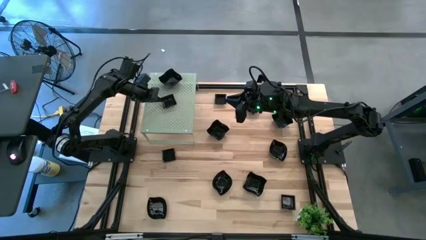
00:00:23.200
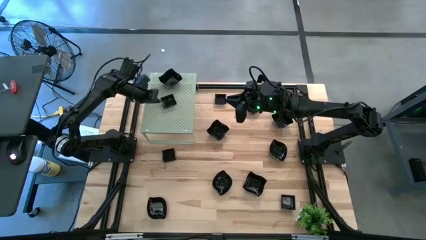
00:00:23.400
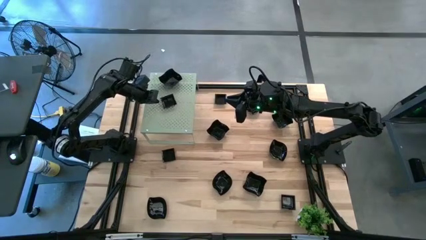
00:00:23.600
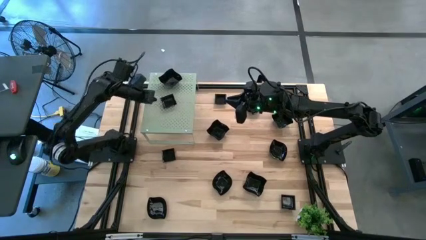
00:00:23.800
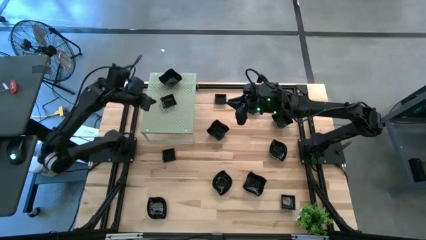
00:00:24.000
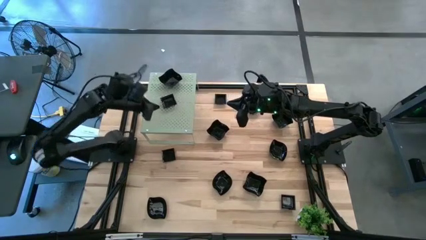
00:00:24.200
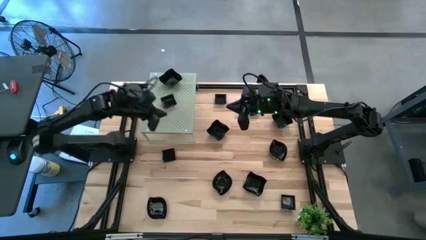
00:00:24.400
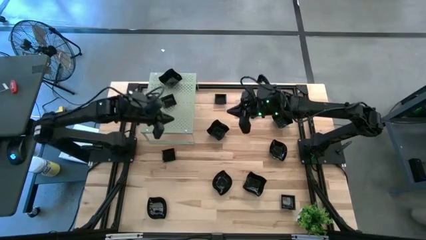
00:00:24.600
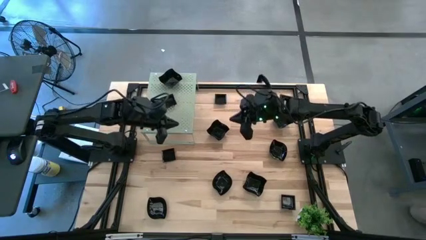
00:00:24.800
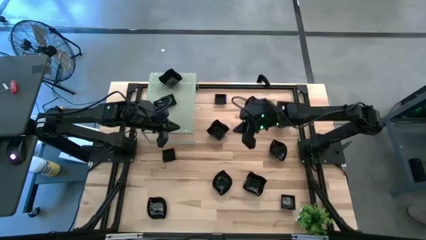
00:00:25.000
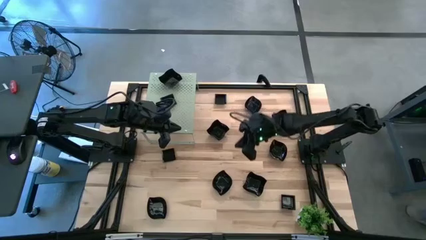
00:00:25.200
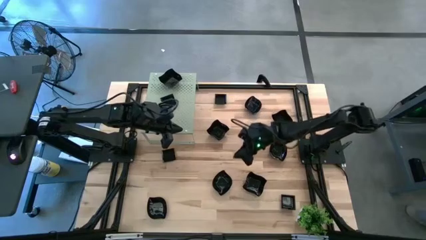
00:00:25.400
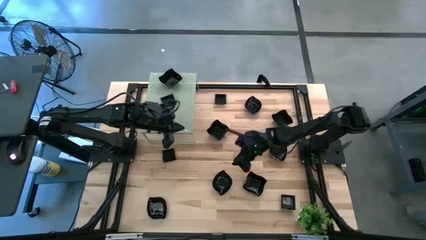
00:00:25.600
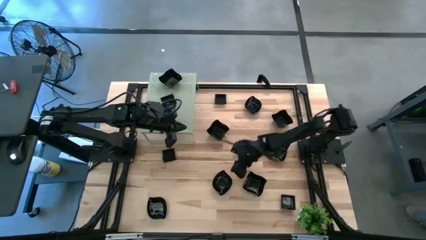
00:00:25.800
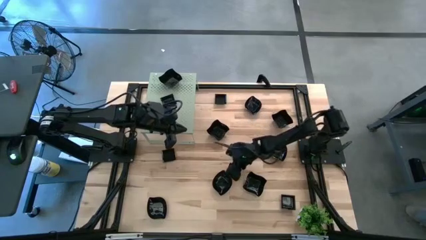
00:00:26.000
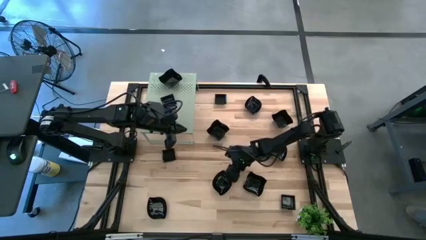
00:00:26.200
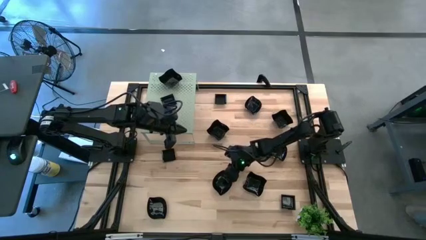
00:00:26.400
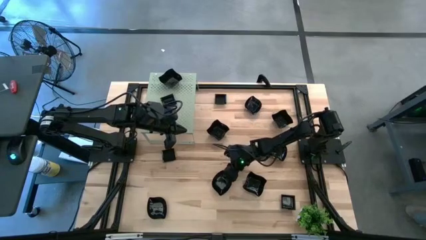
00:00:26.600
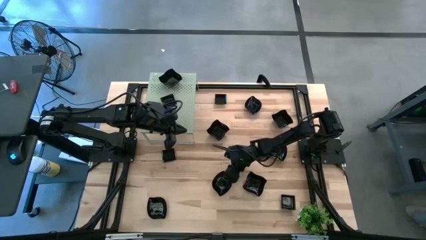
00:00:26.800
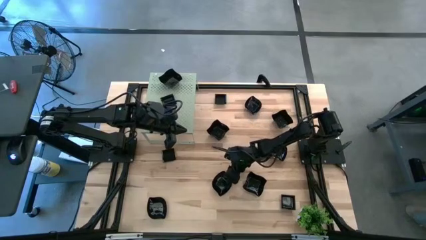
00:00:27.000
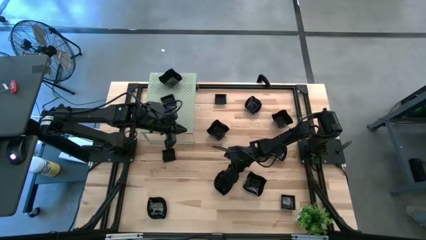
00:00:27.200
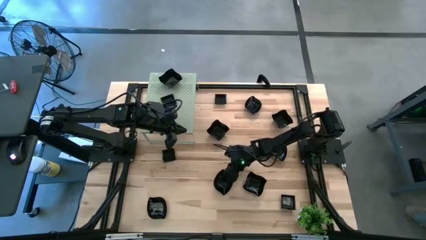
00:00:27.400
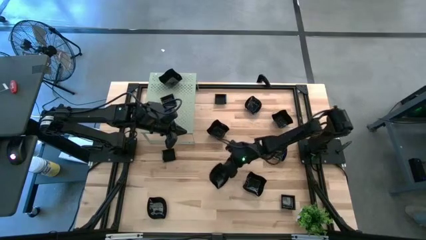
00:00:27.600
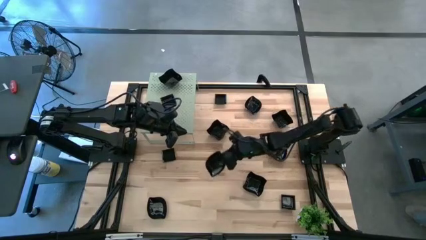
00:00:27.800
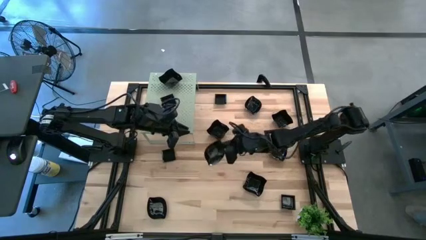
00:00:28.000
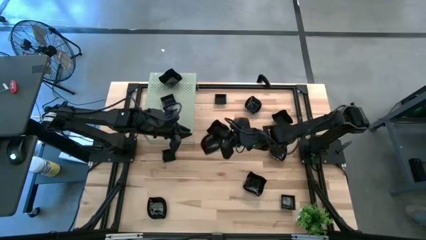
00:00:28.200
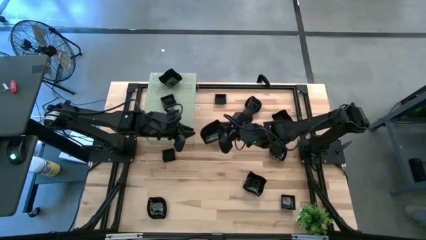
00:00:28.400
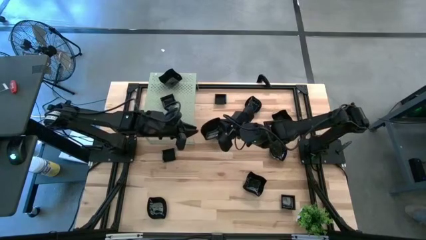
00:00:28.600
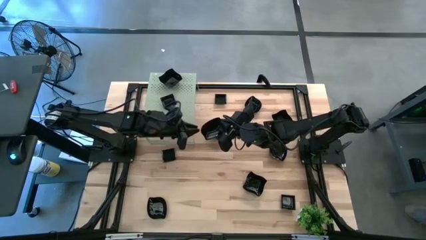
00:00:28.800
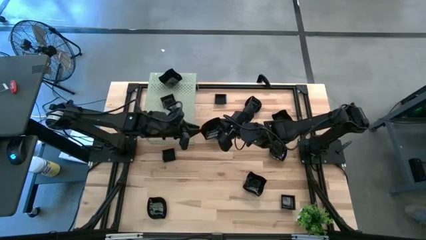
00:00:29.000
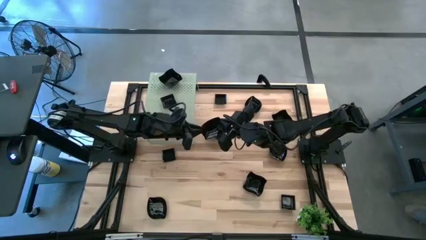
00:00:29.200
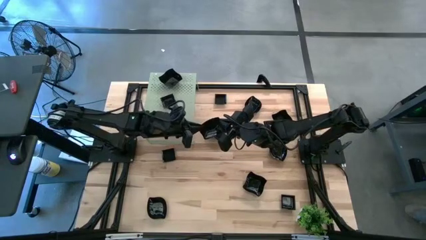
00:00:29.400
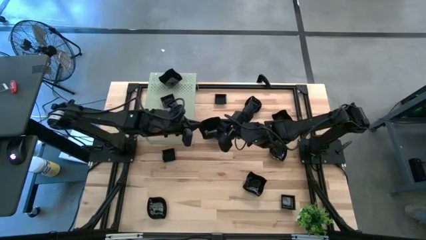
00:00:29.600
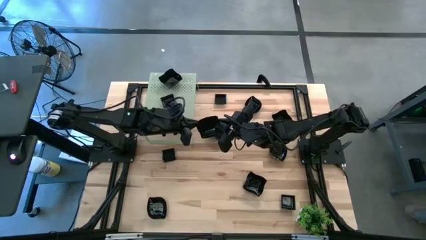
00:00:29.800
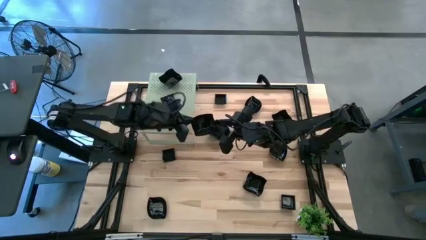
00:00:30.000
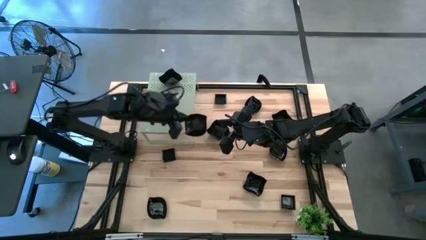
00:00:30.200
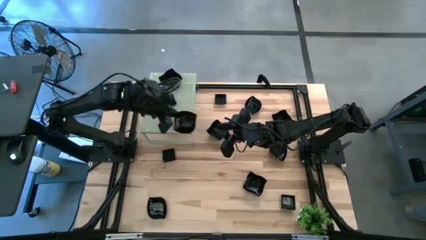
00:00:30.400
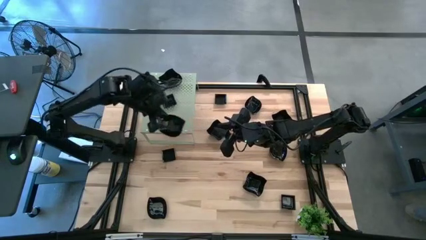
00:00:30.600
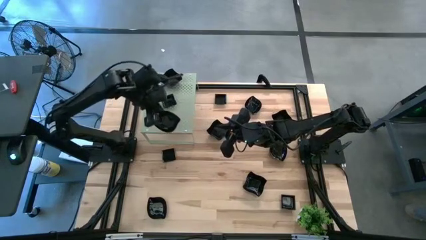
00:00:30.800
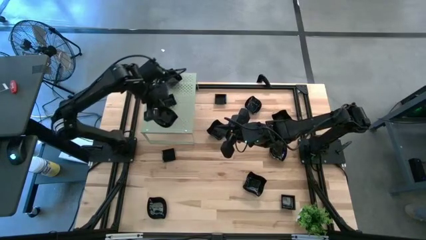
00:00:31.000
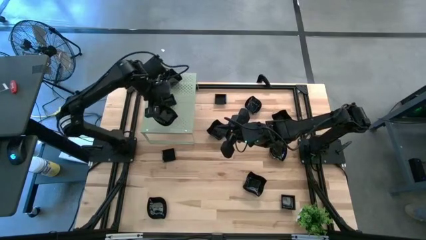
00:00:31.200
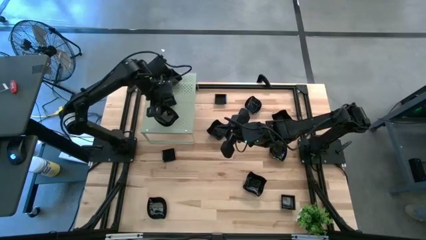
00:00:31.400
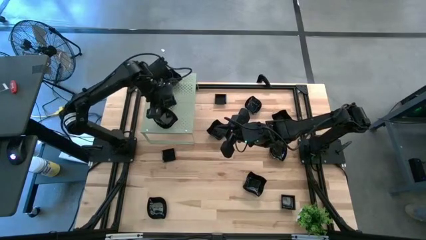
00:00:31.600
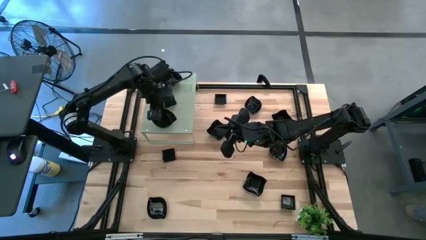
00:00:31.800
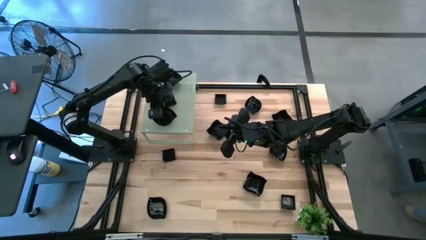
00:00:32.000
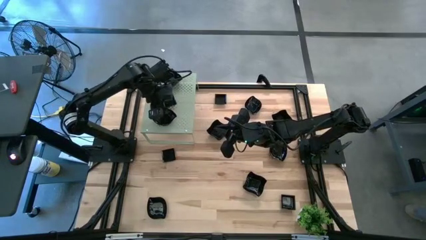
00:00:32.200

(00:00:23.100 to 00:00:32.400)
Task: Pick & Place Mini shaped plates
Put the leaf-shaped plate on the shelf

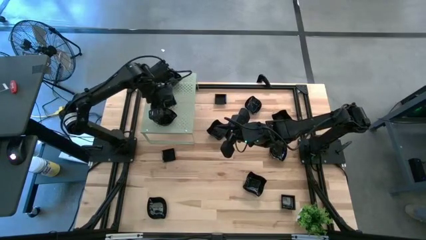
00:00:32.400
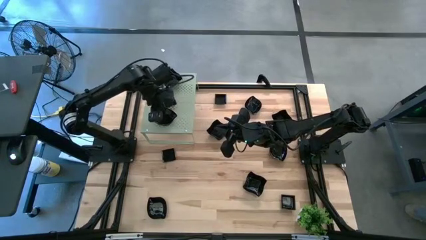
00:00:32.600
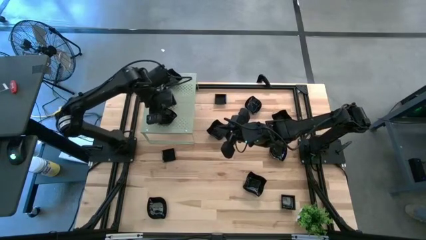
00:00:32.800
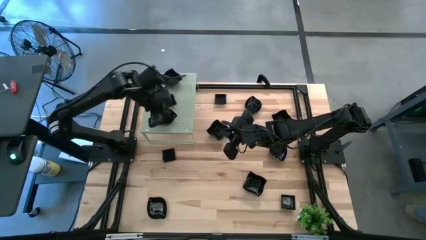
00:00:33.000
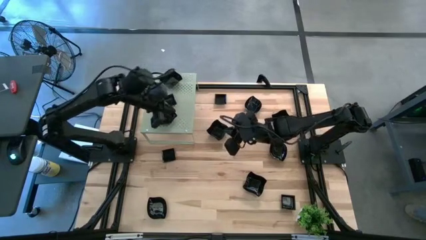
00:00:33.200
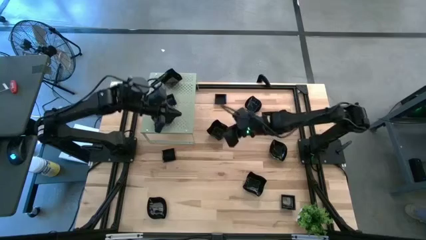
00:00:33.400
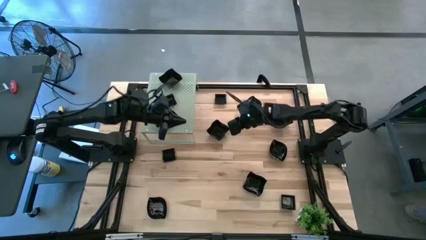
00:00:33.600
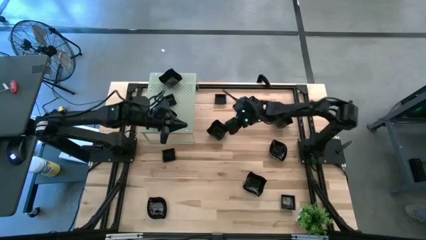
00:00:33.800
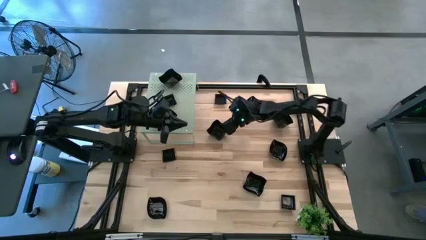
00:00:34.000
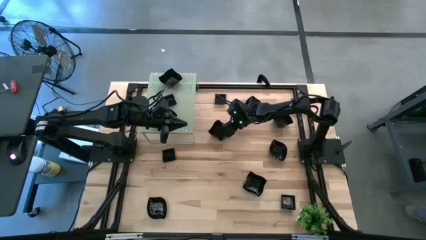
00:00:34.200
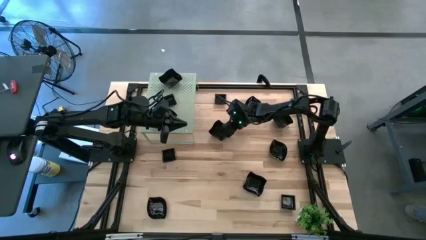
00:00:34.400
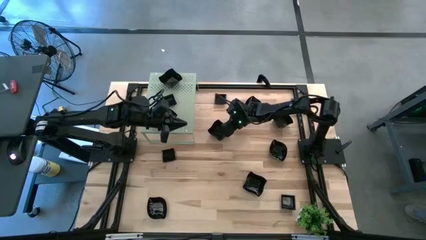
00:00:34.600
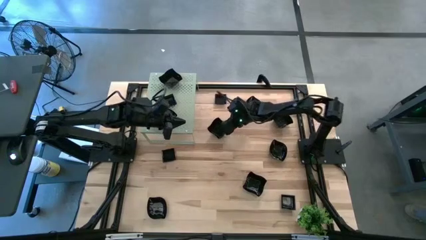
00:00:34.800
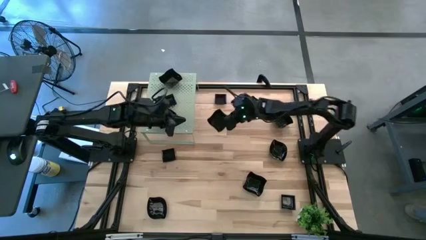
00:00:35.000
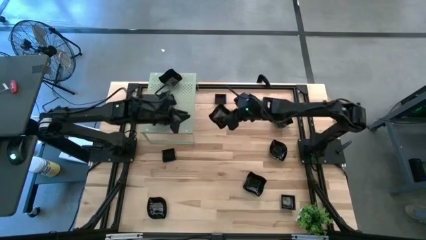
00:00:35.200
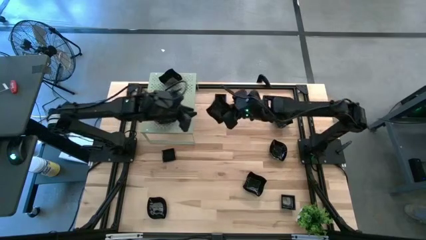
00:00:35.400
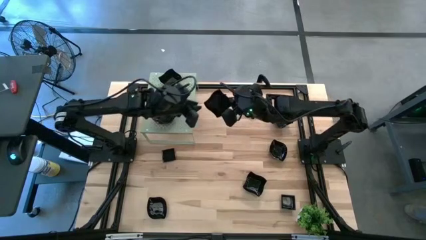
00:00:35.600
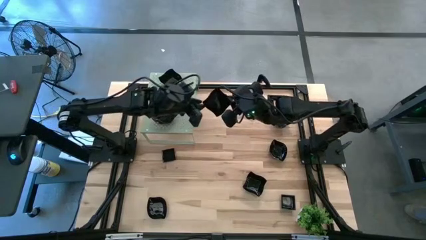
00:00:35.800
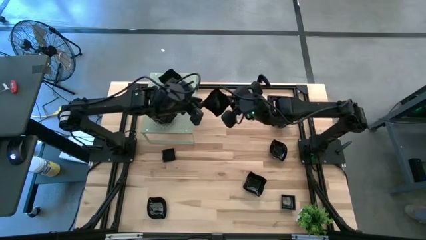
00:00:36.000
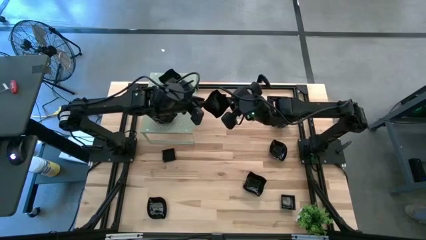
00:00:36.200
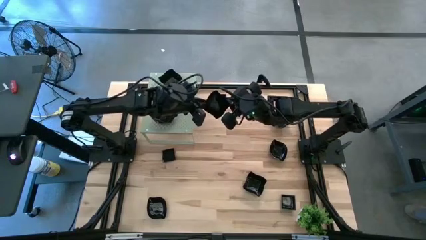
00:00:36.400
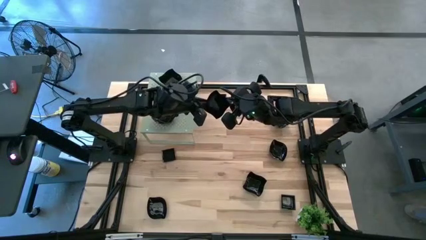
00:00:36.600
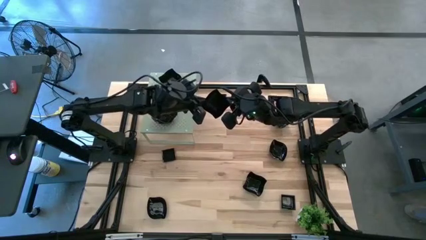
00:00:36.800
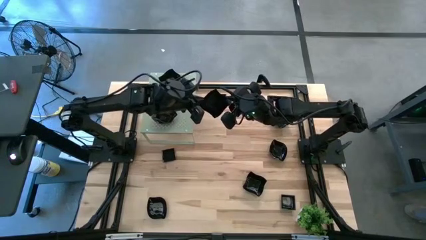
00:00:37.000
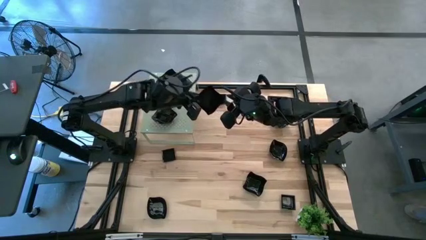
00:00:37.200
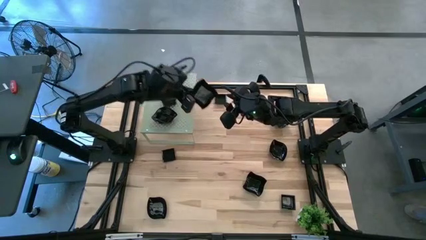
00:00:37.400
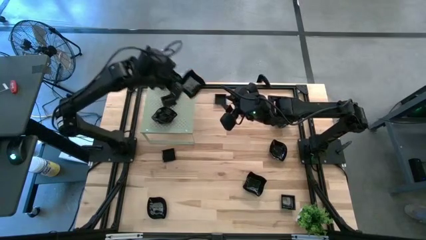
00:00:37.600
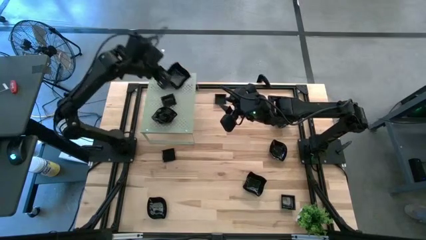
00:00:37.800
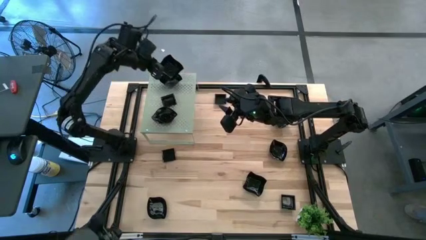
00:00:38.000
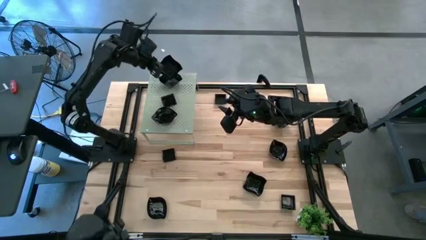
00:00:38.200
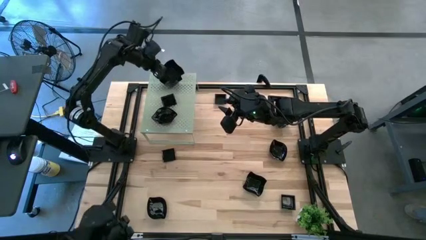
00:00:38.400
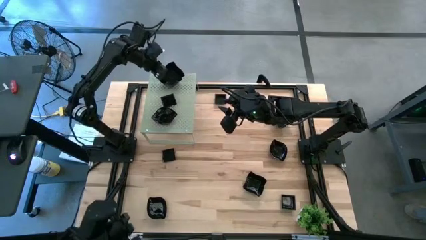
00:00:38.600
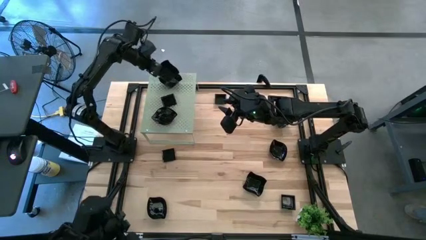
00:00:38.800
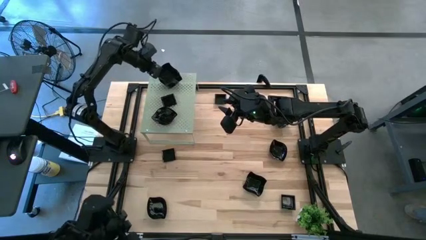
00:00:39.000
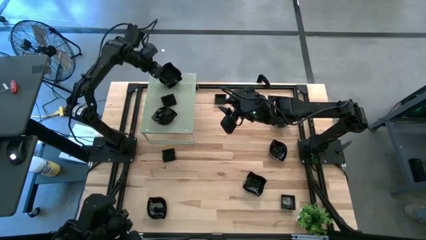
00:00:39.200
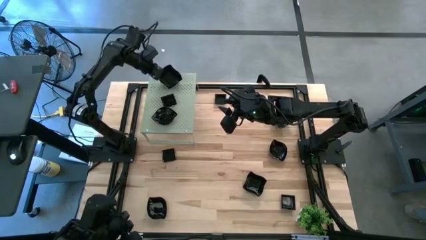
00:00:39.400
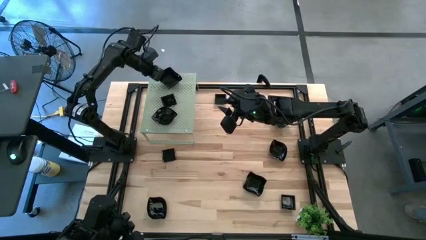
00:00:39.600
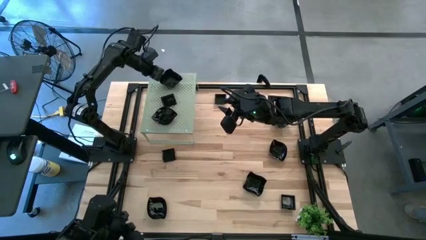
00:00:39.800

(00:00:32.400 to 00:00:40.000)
Stack the distorted square plate on the other distorted square plate on the shelf
